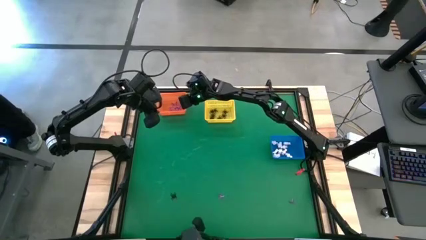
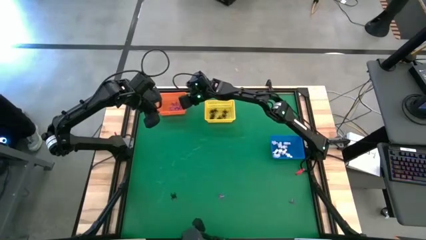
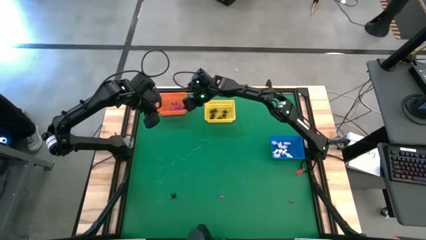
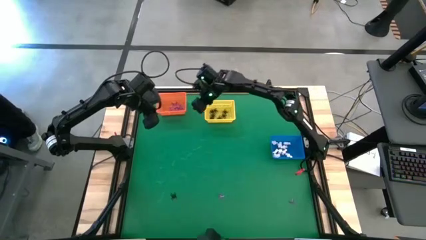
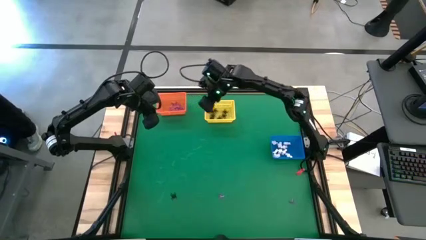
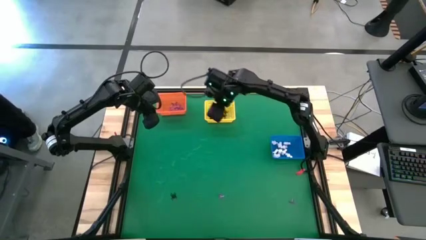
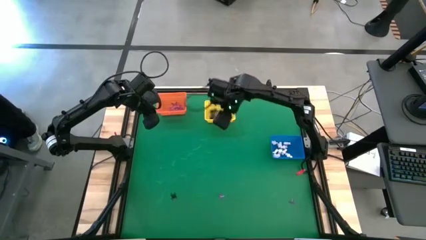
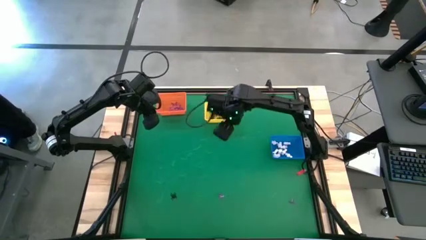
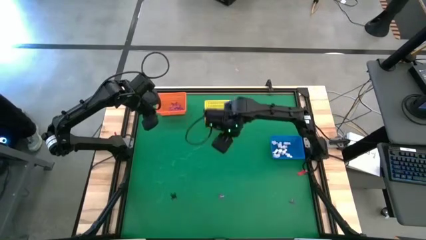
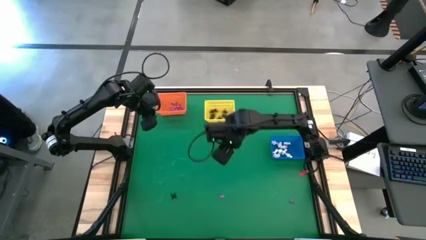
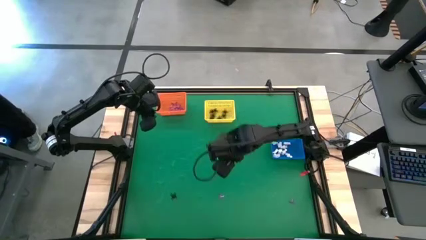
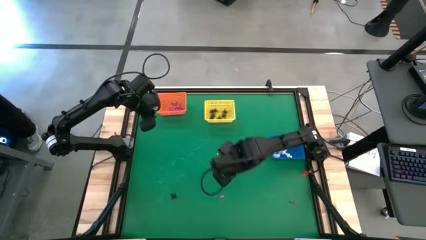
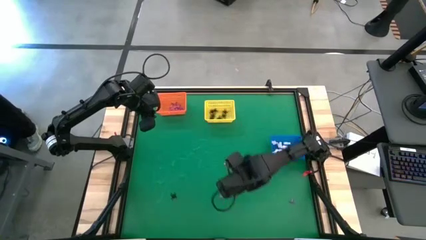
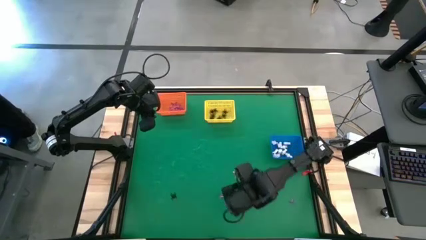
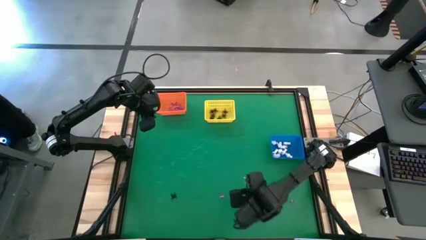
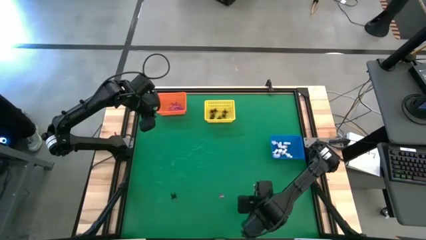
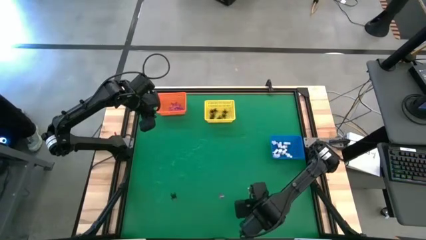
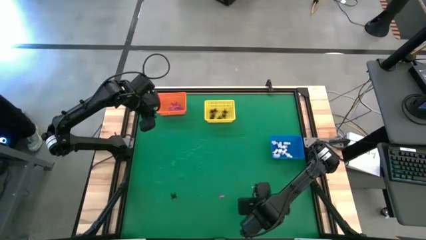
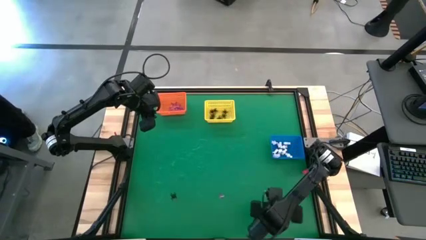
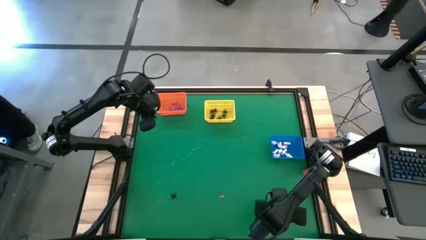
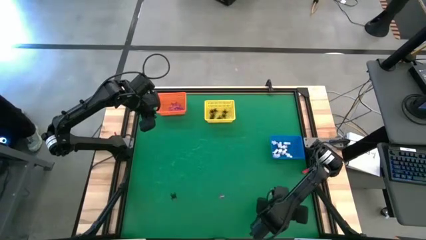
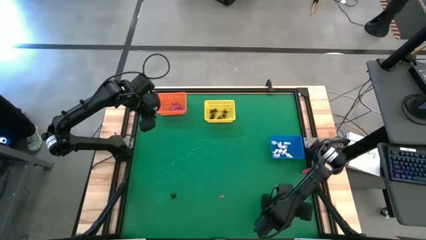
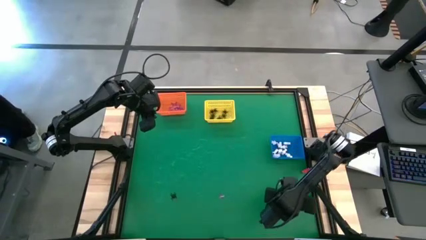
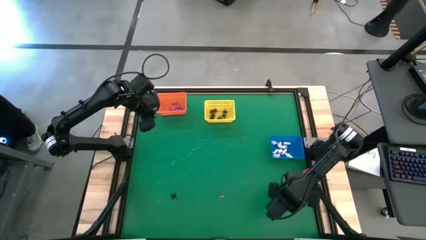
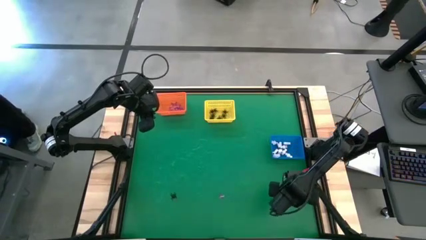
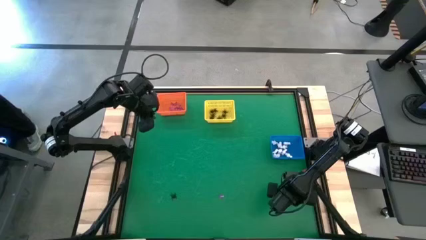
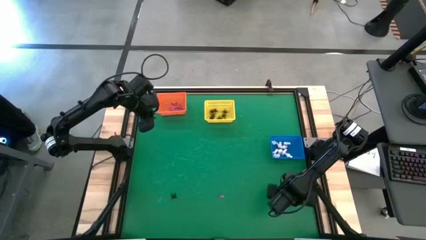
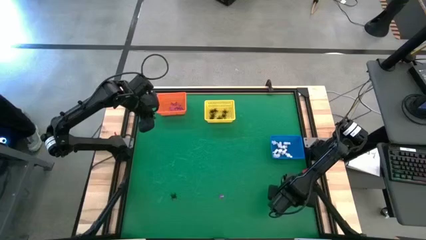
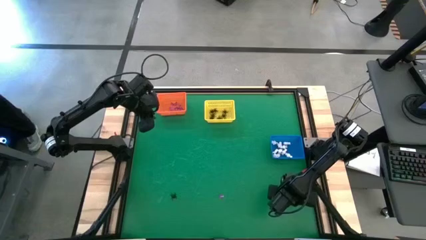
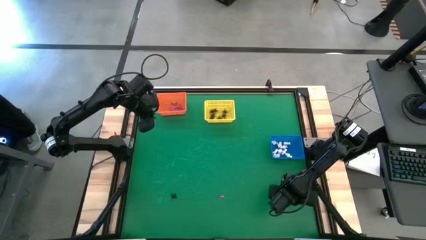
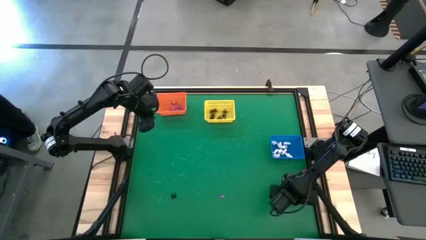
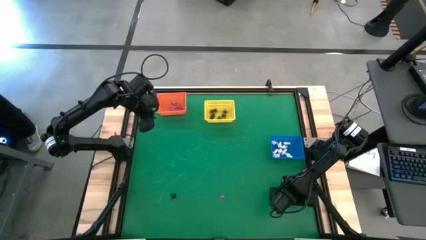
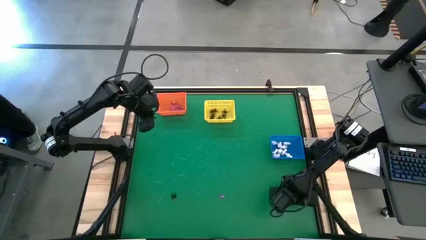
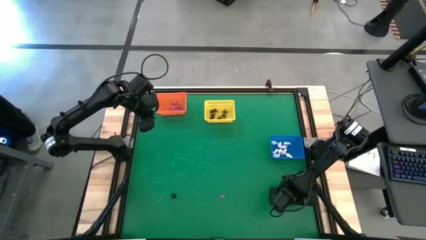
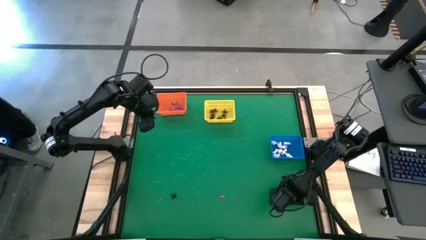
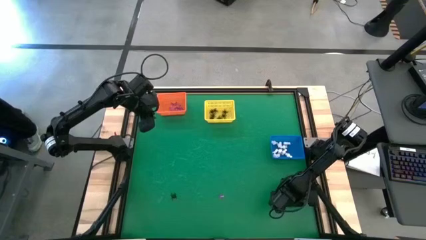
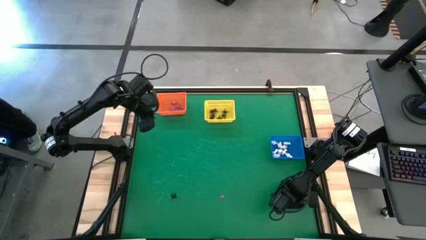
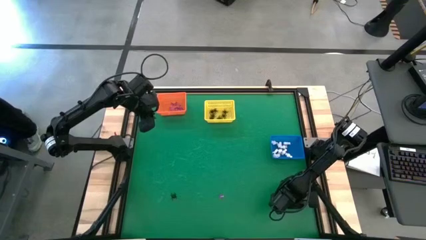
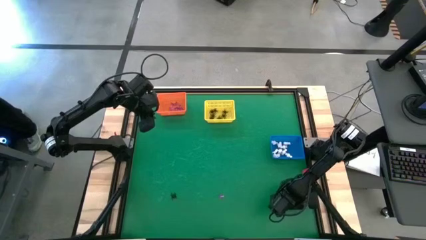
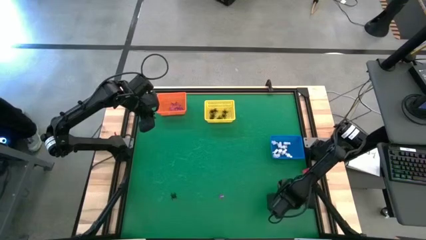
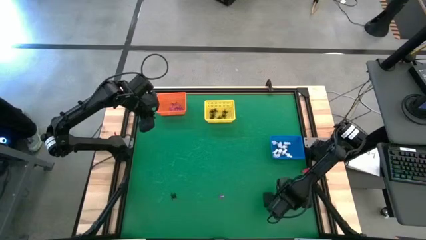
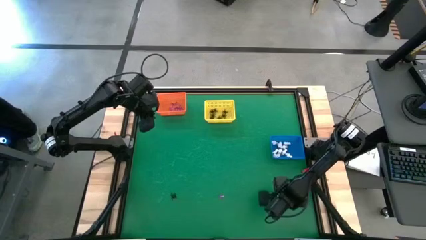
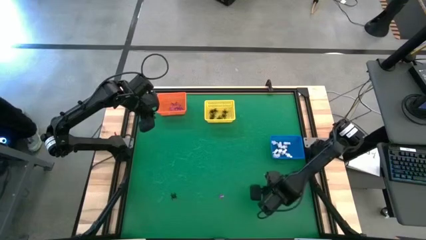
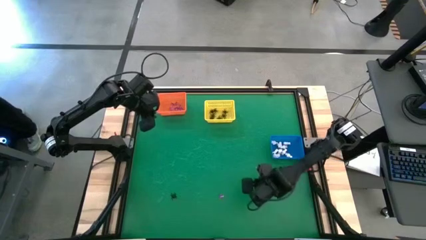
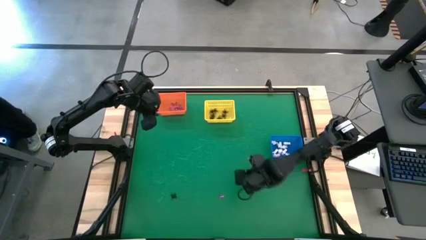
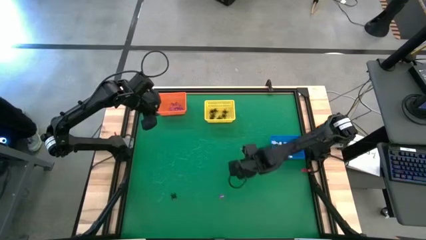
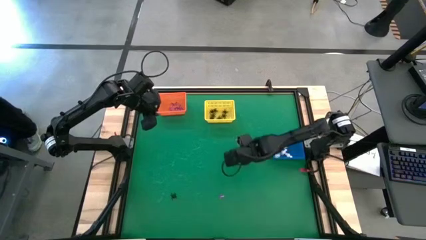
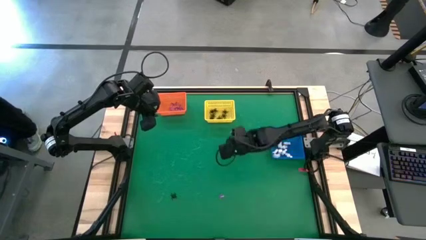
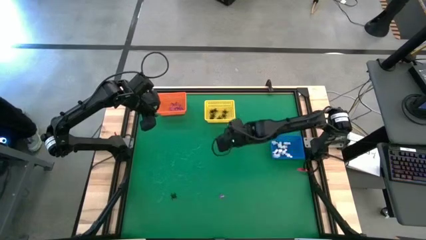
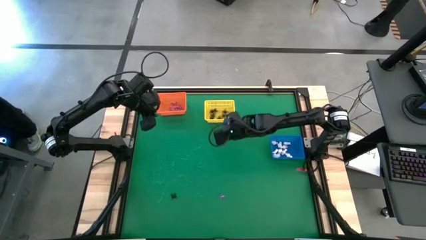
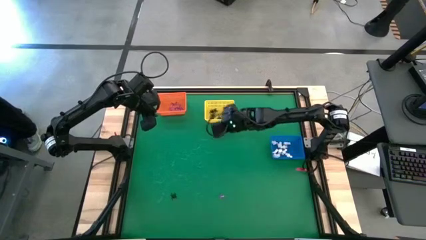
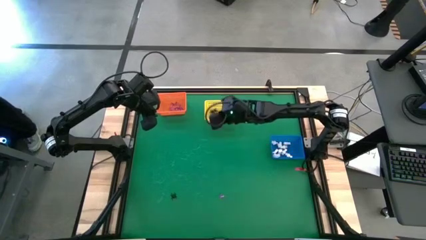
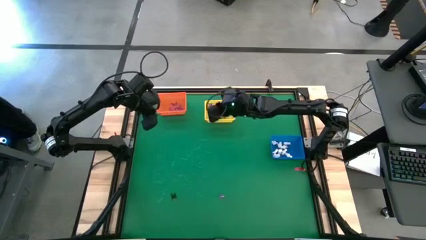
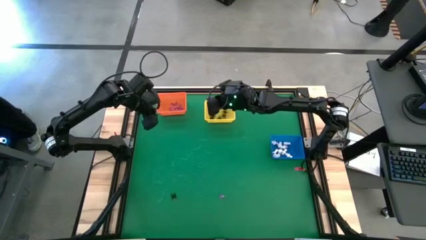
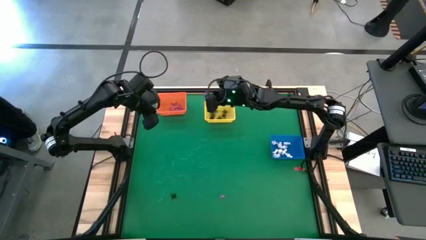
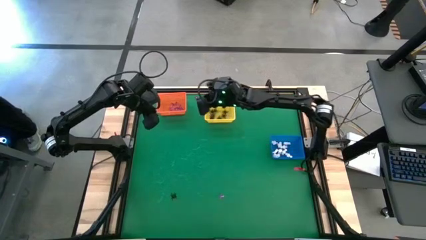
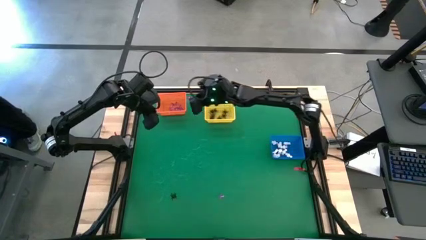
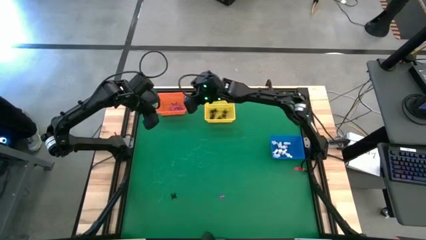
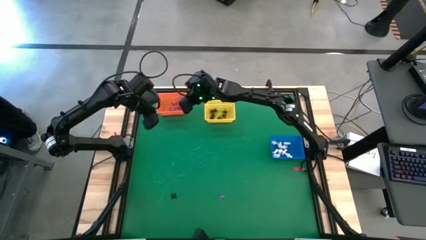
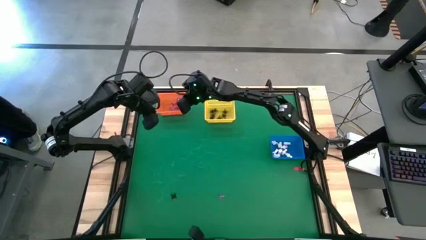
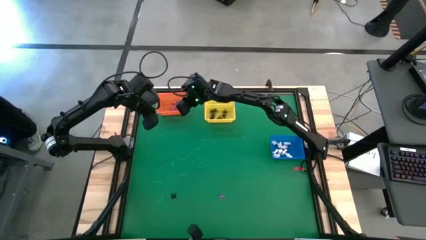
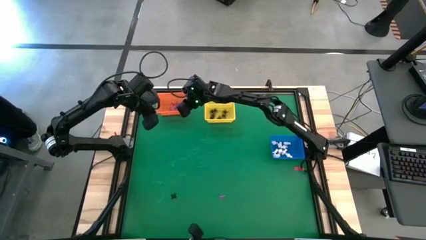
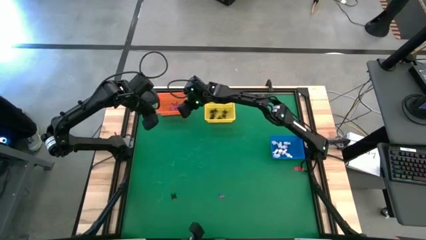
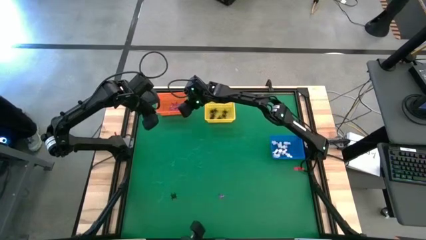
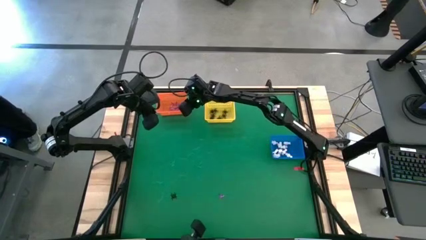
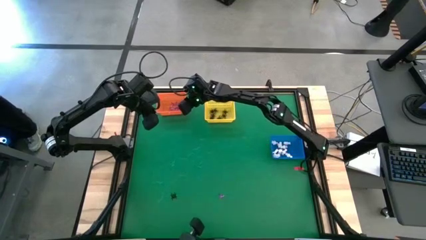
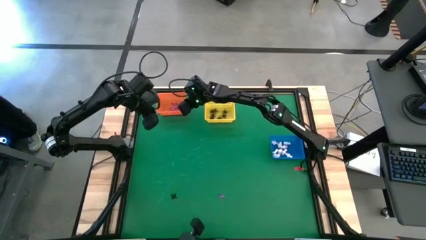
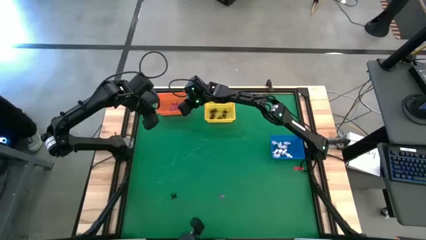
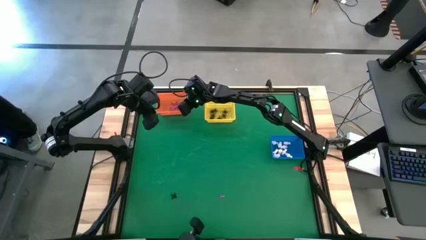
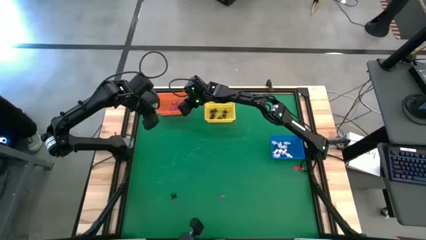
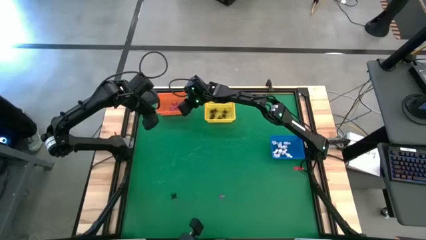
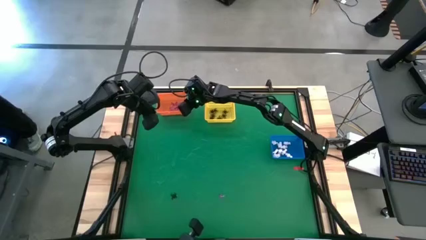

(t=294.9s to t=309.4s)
Task: Sort Halloween decoration
Put the violet hat toy into the orange basket

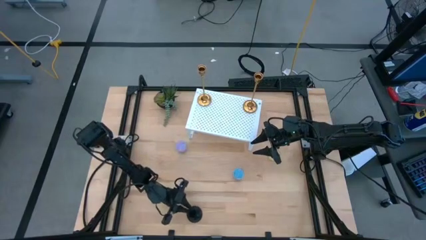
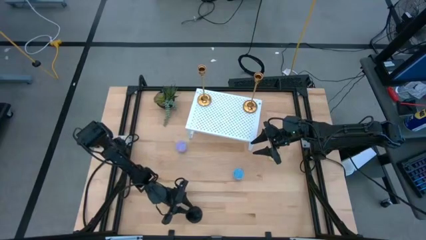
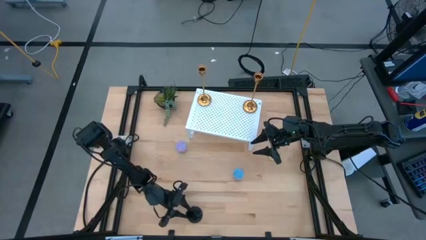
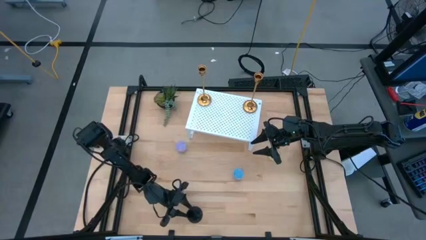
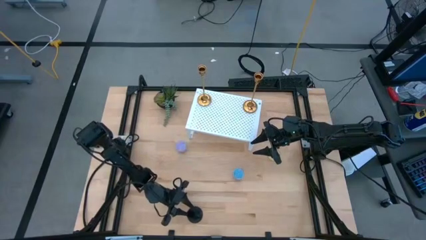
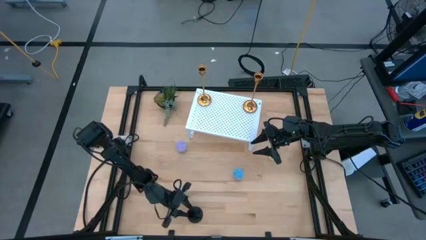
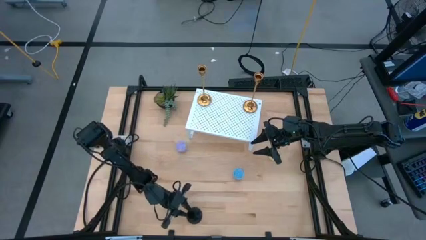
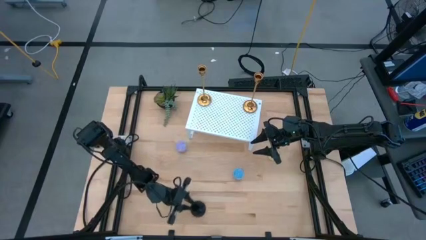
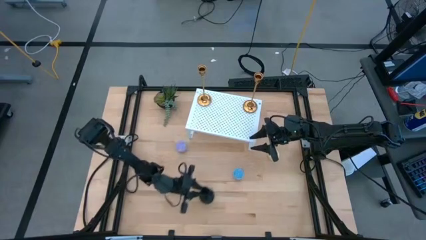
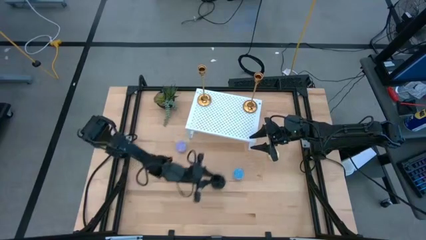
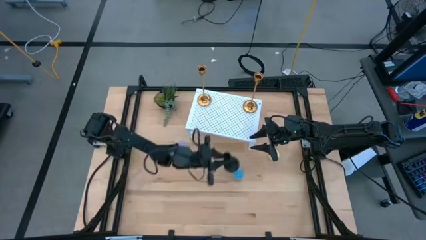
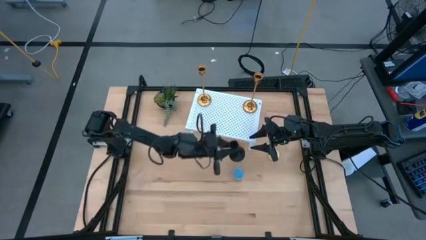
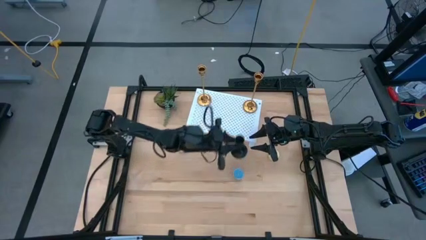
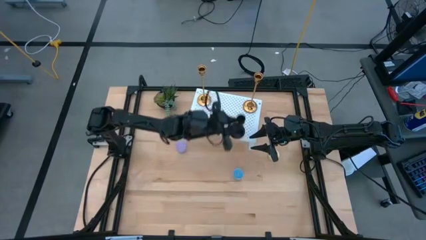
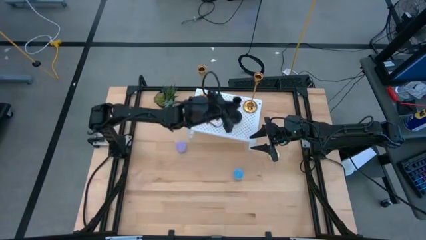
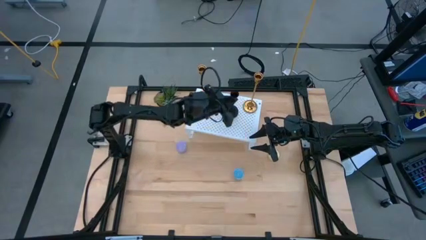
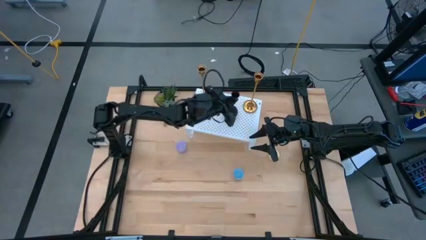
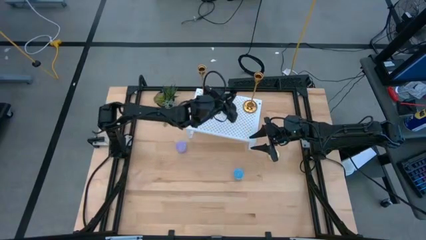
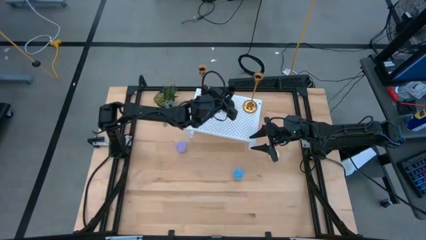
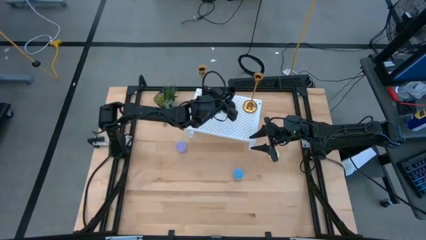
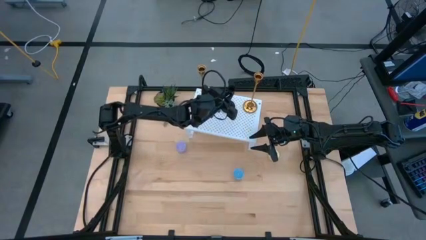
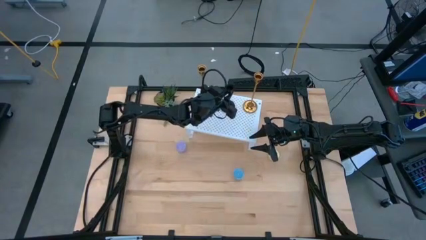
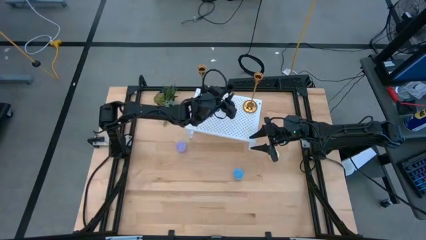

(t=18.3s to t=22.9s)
Task: Pick & Place candle stick holders
Put the black candle holder on the shelf aligned with the gold candle holder
